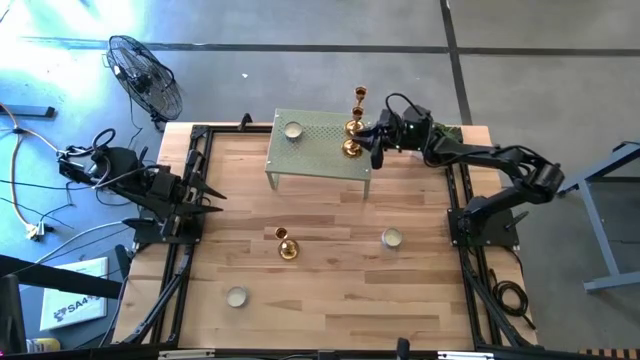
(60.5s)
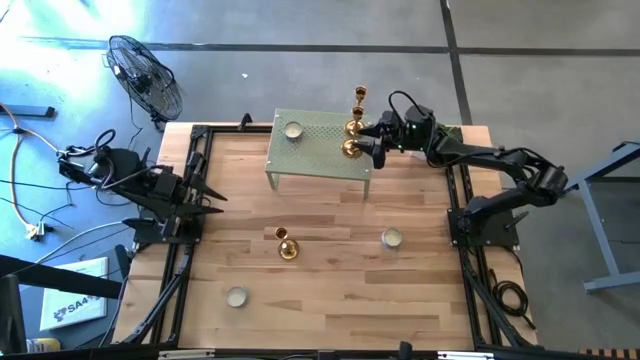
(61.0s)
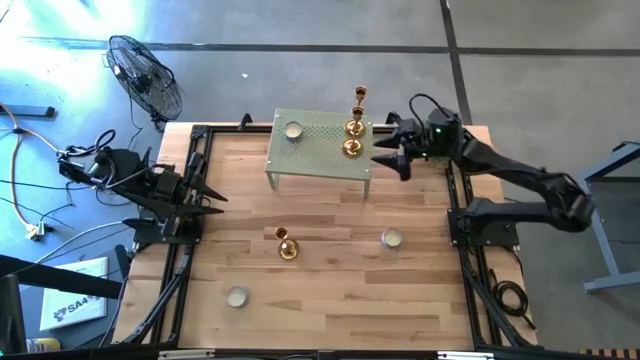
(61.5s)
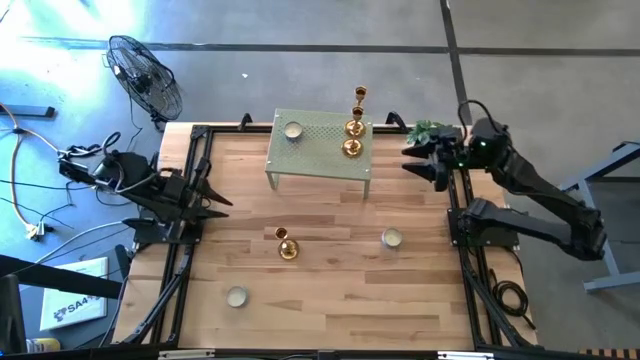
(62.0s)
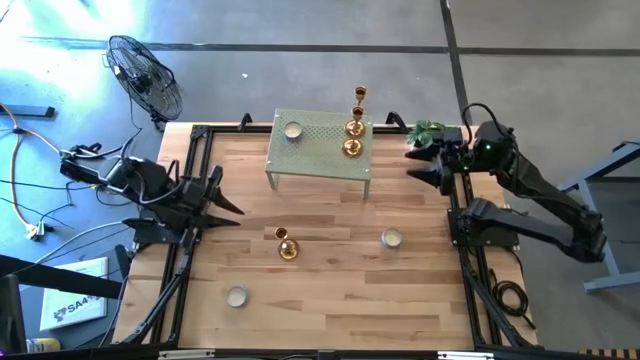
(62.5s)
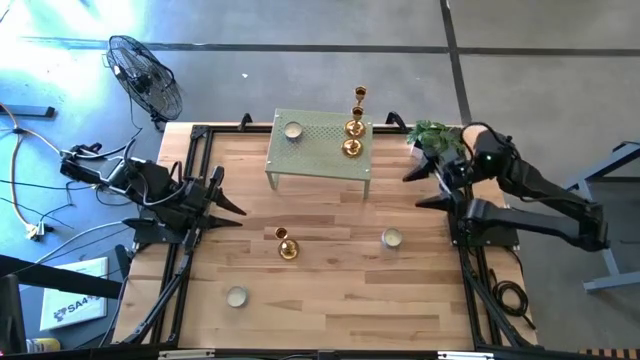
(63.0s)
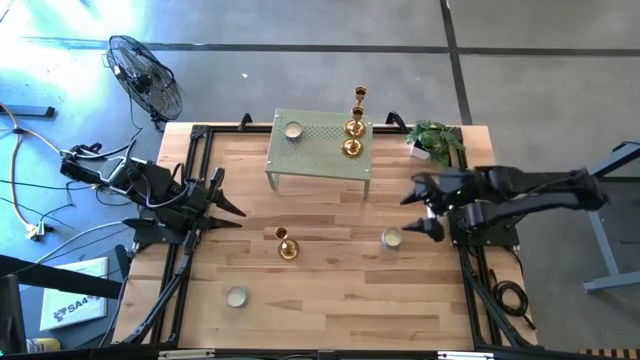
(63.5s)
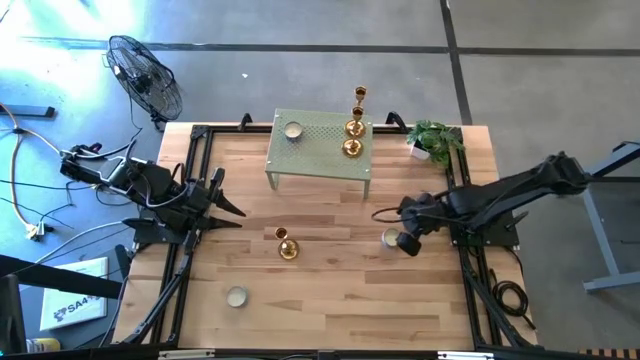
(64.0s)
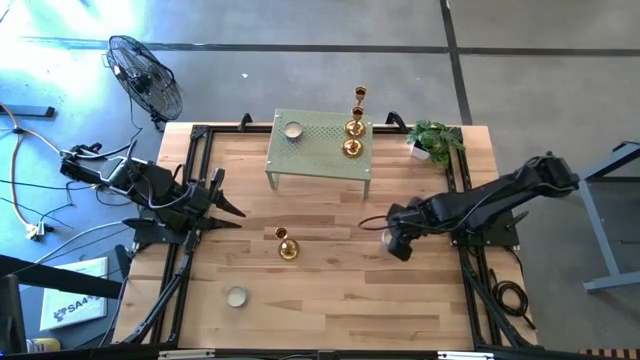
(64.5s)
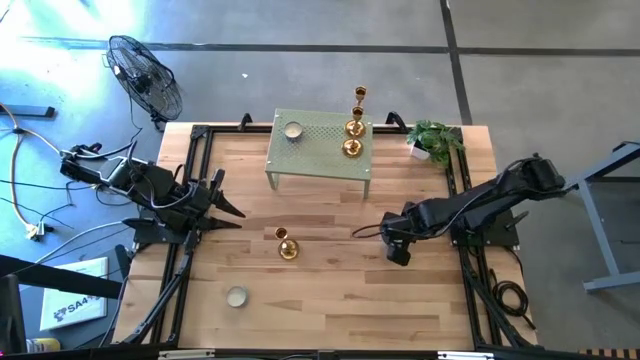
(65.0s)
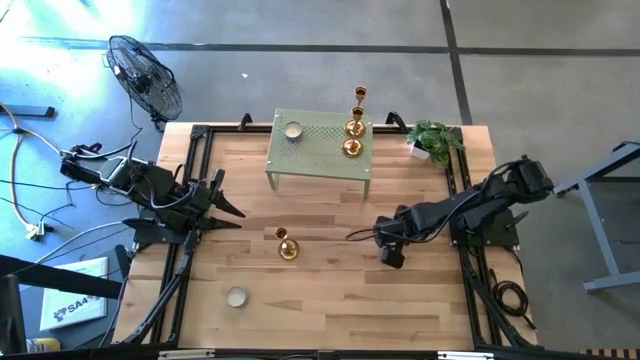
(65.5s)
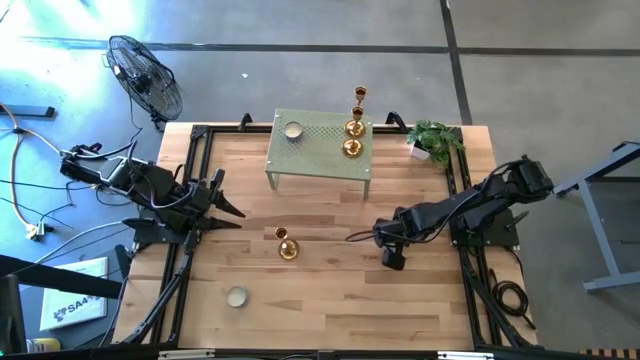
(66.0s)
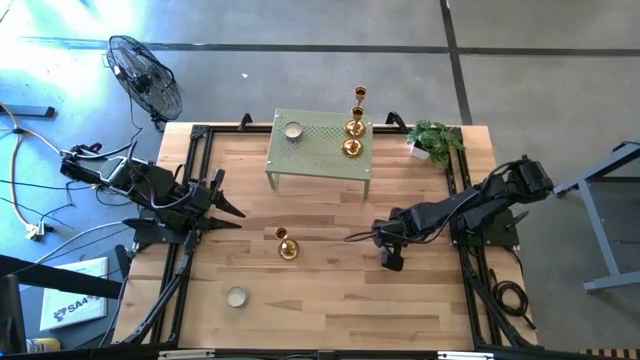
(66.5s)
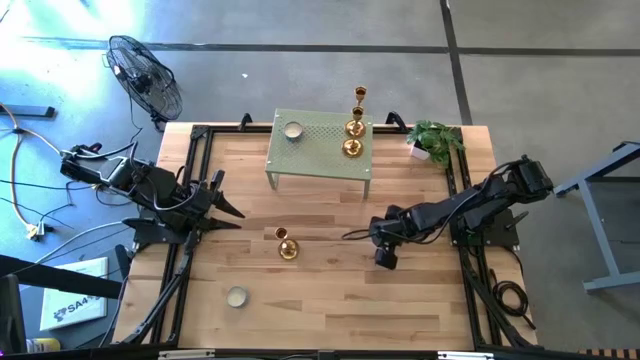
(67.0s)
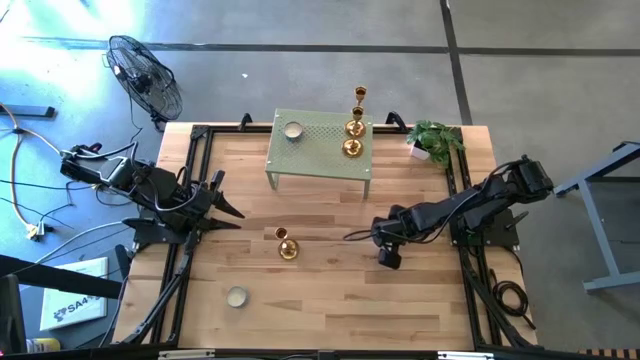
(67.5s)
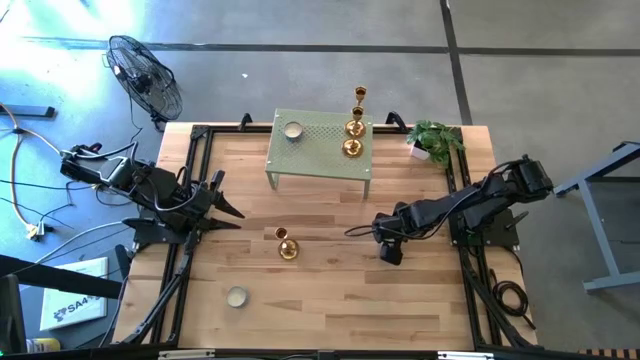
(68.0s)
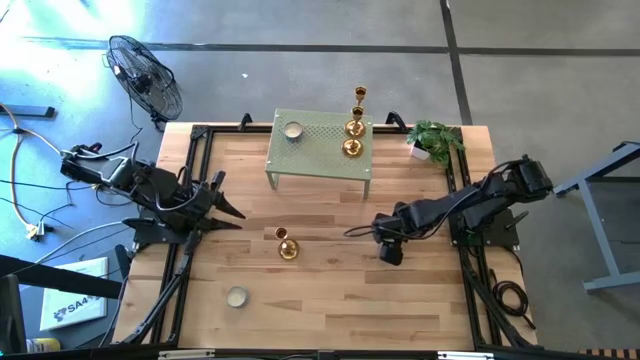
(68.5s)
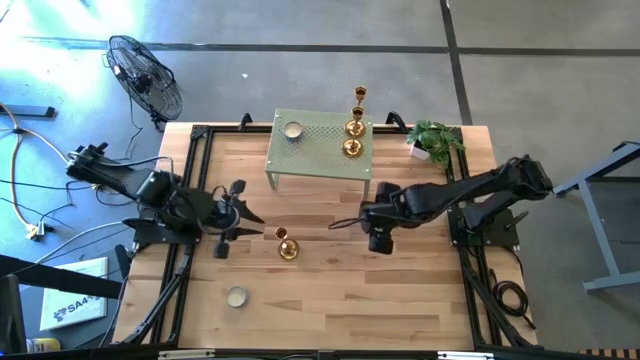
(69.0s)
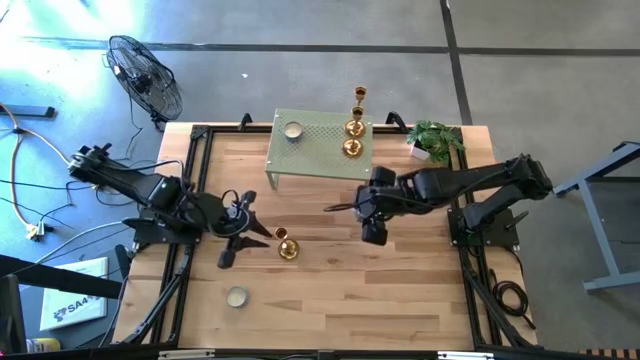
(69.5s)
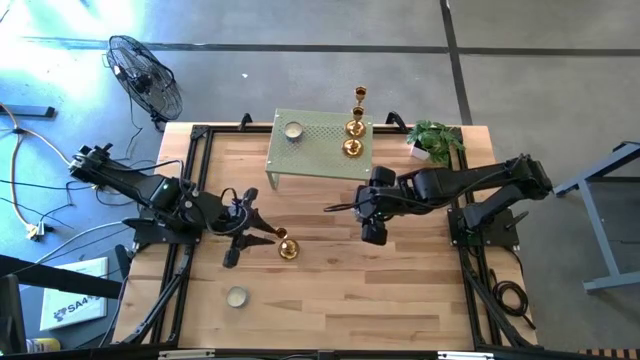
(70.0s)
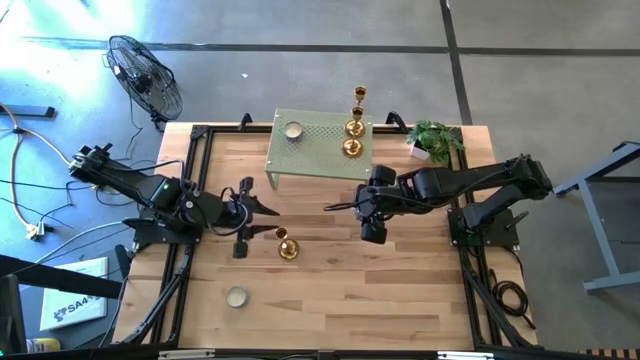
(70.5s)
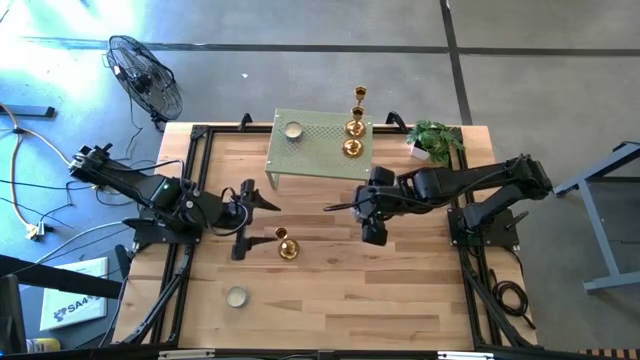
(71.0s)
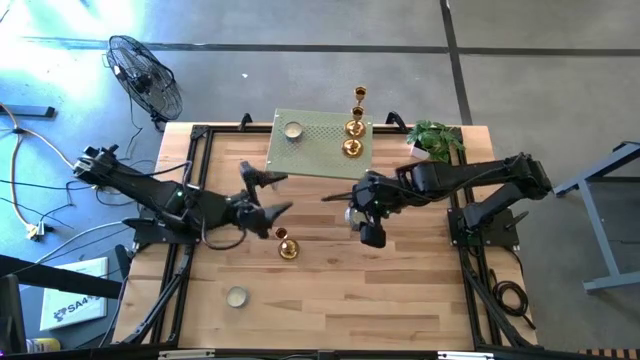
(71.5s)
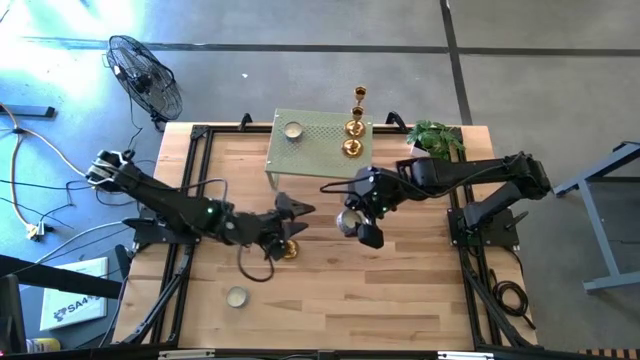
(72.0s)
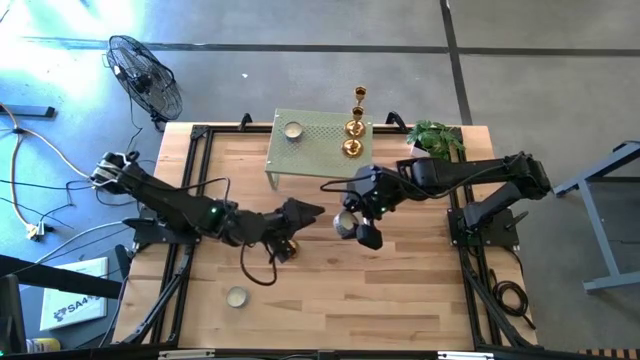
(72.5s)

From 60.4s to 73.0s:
Task: Stock candles and holders on shelf
Align the right light blue scented candle with the other scented candle on the shelf

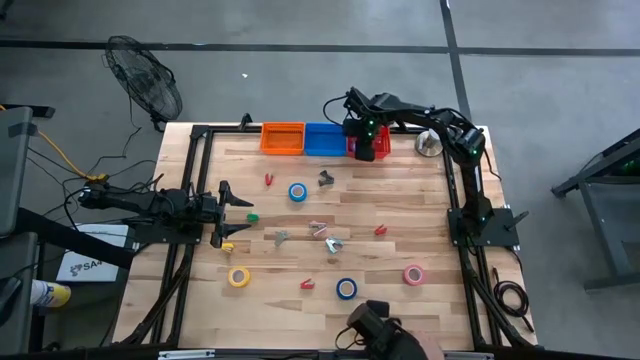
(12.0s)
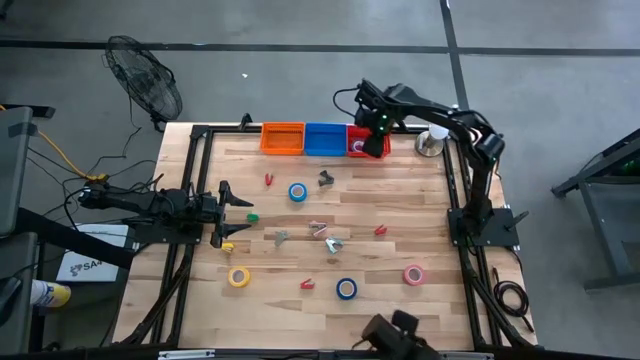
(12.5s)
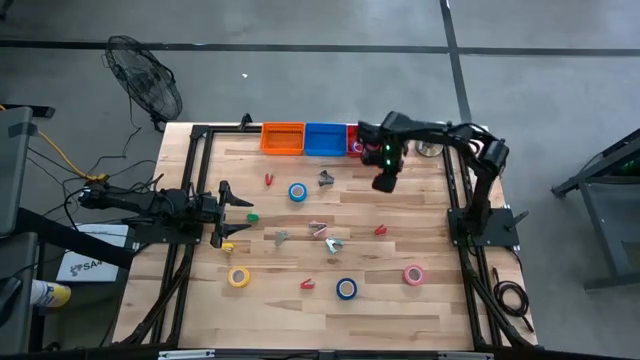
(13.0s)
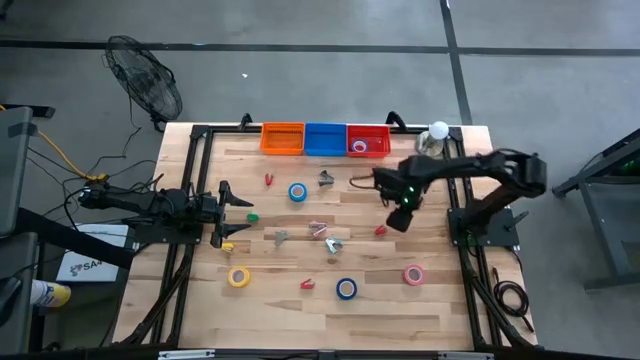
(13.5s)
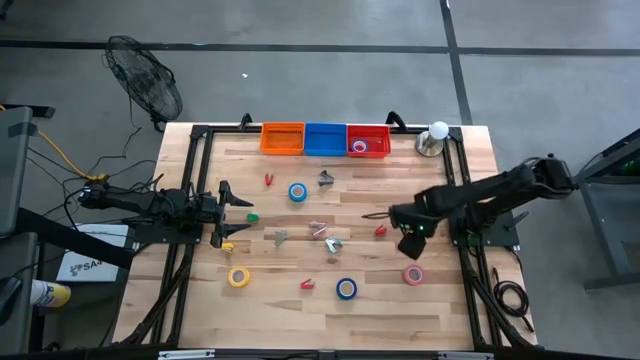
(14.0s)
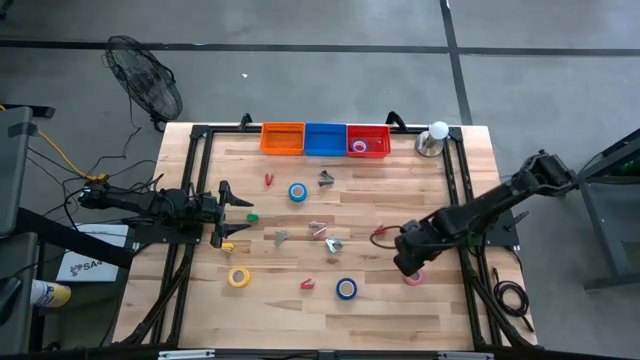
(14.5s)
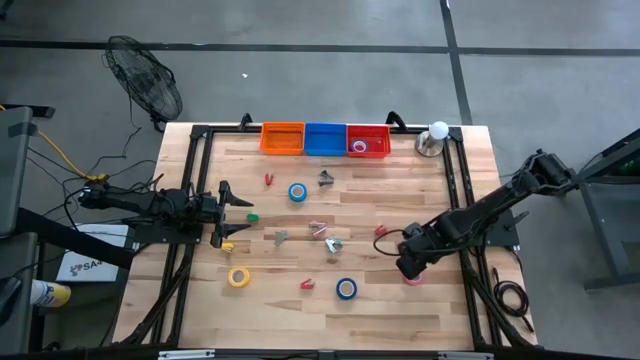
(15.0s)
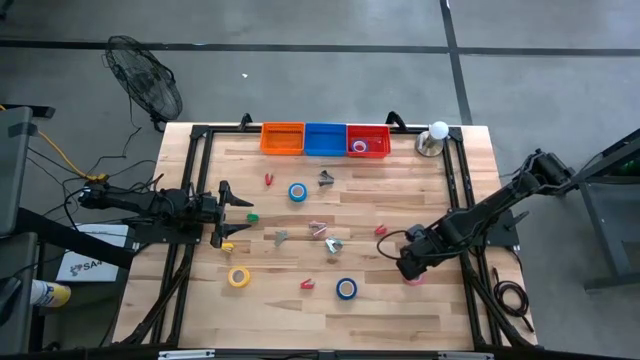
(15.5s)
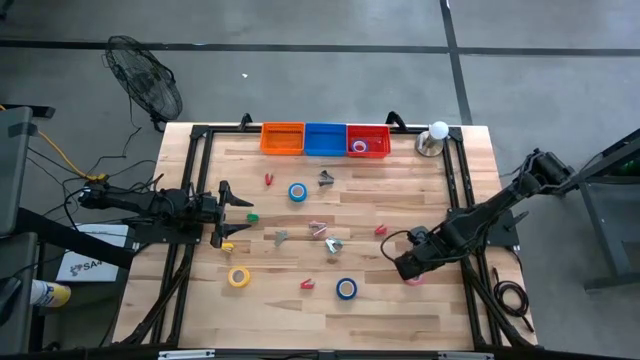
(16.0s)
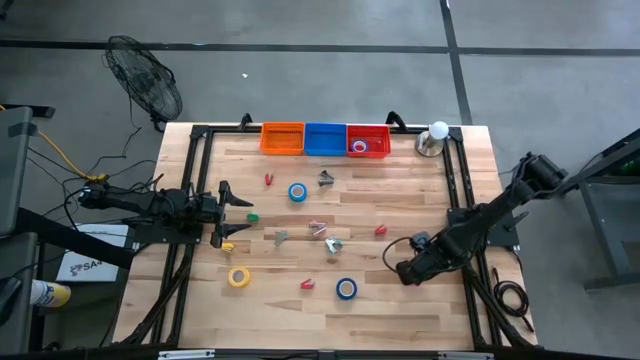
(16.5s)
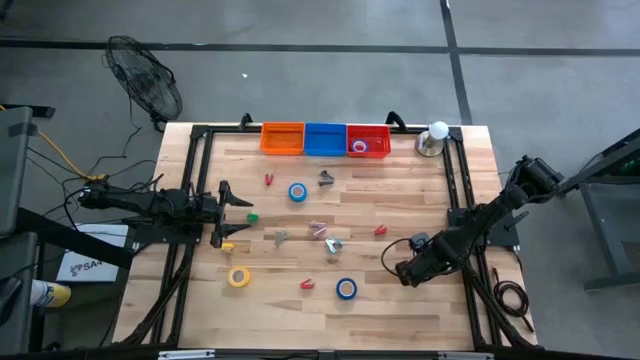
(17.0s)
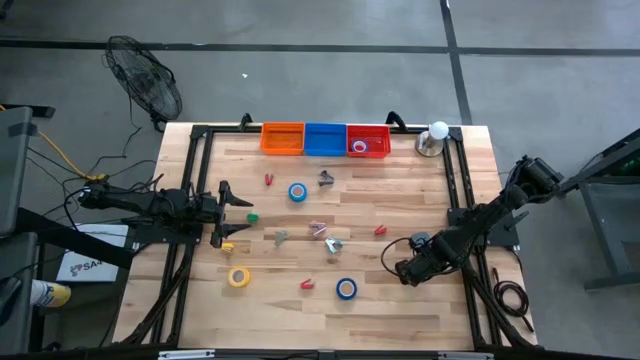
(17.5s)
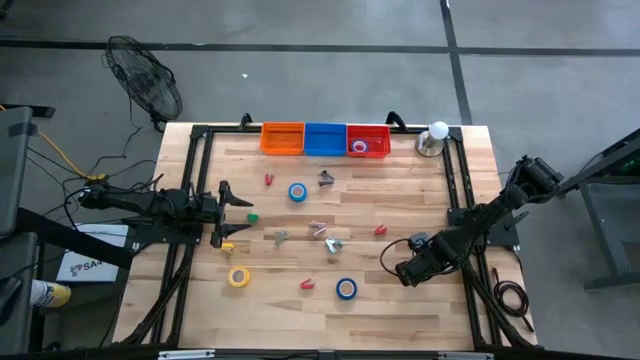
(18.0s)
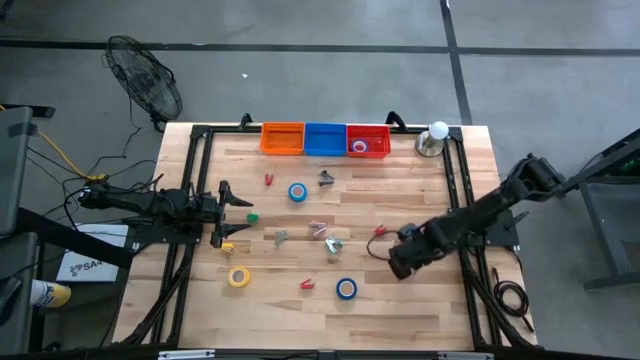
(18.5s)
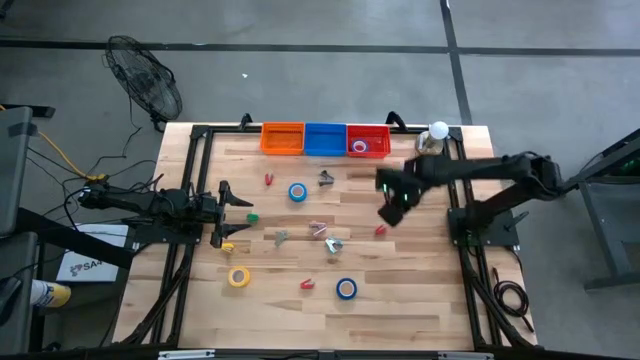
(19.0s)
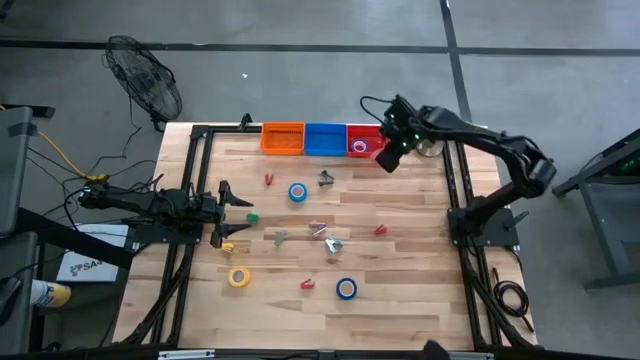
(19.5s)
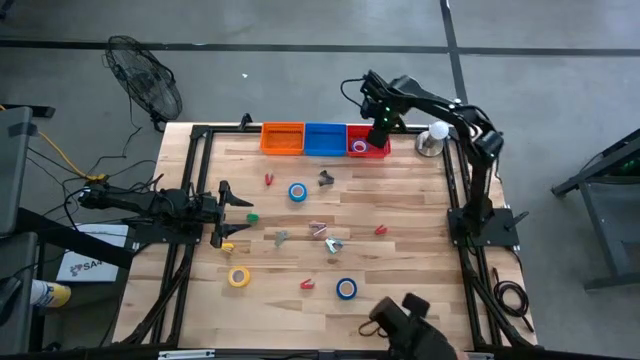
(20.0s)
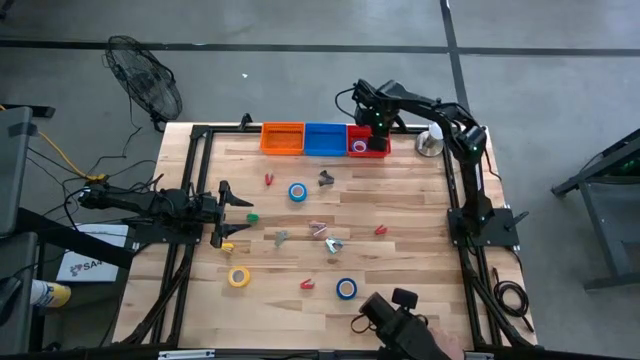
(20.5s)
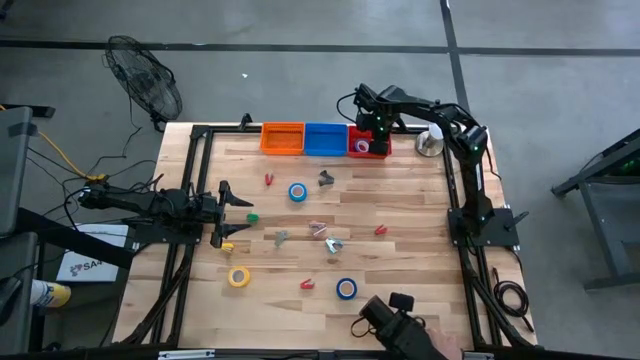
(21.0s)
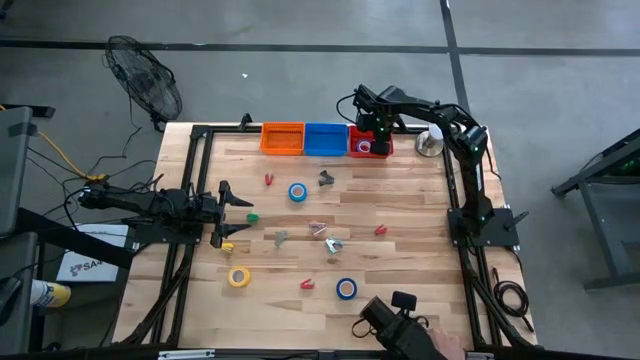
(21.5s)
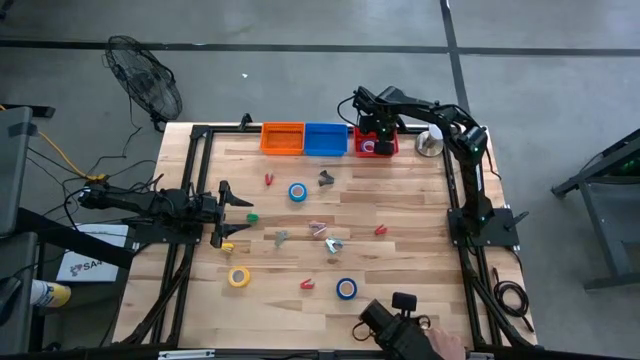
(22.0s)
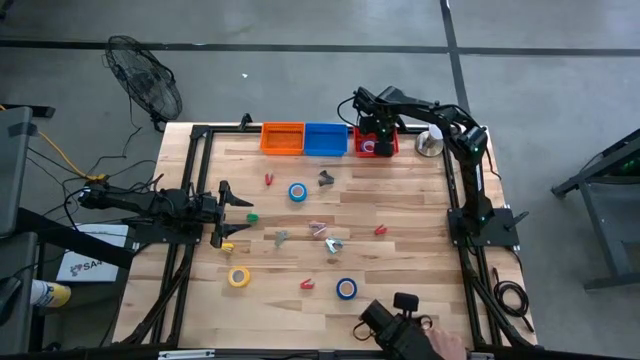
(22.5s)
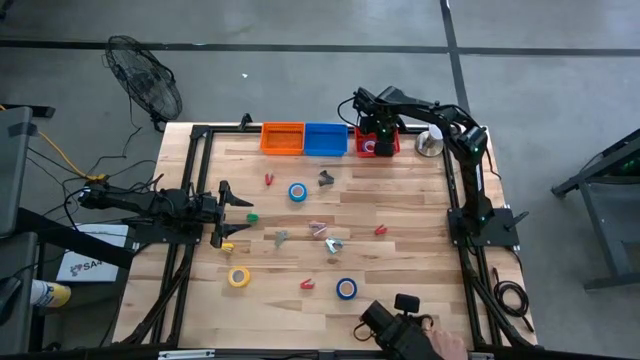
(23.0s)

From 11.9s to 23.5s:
Task: Pick and place Stapler, Stapler remover, tape
Put the pink tape into the red bin
